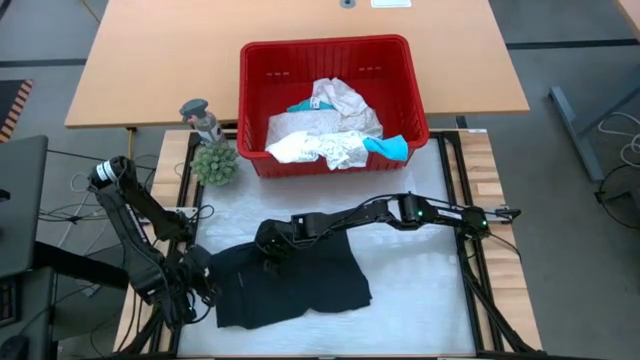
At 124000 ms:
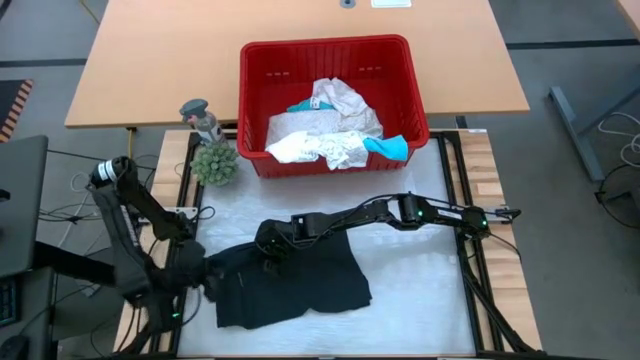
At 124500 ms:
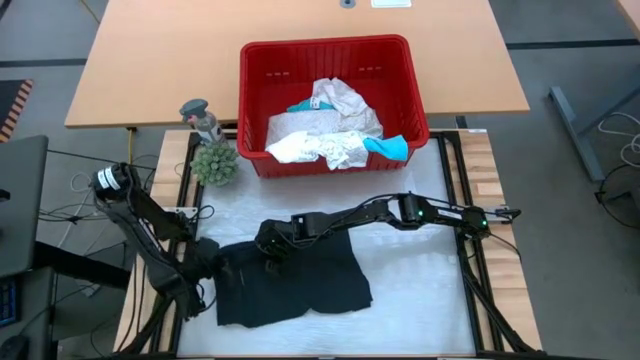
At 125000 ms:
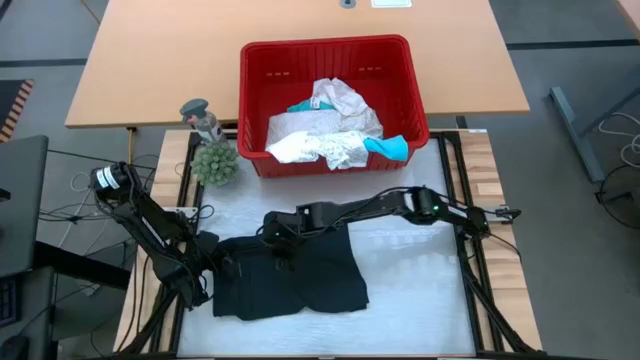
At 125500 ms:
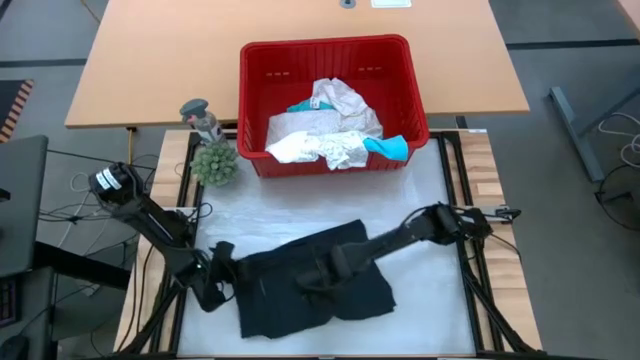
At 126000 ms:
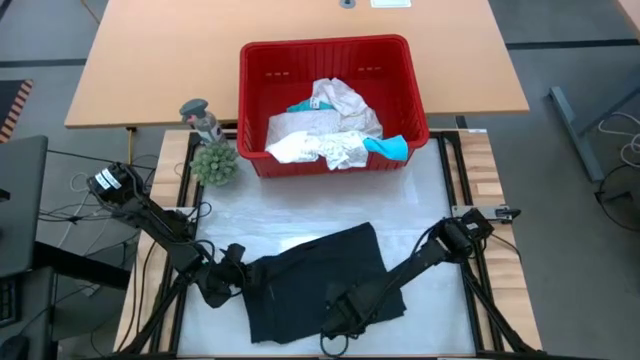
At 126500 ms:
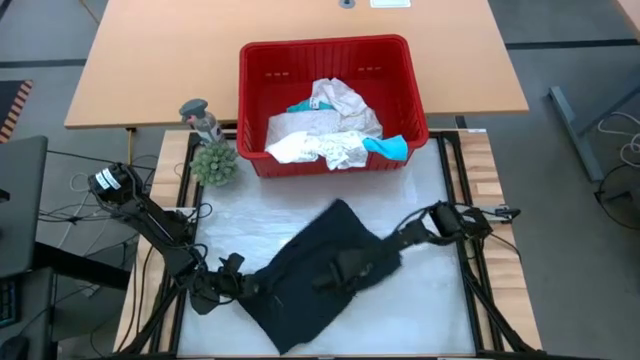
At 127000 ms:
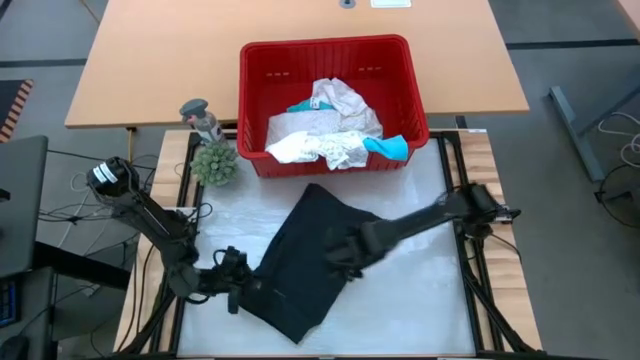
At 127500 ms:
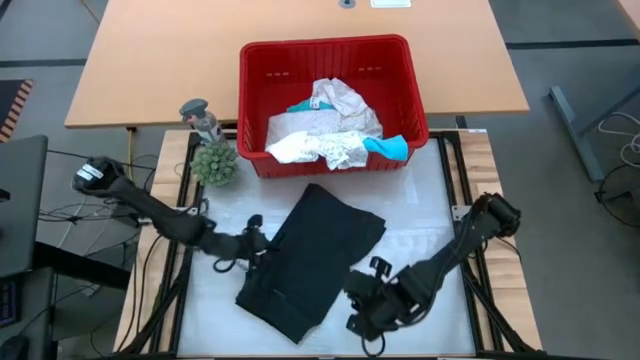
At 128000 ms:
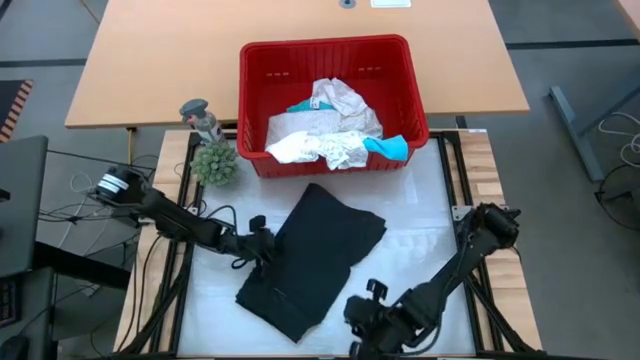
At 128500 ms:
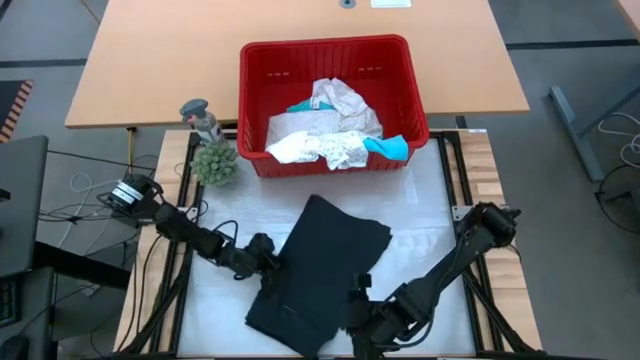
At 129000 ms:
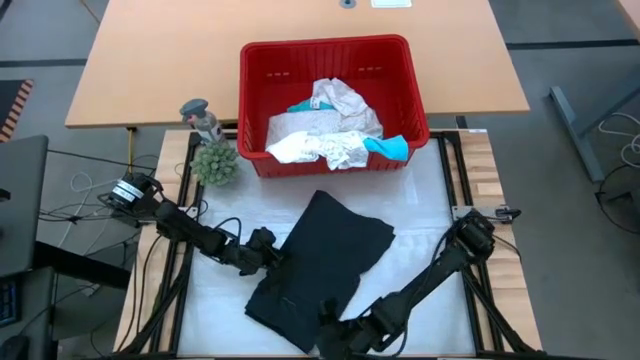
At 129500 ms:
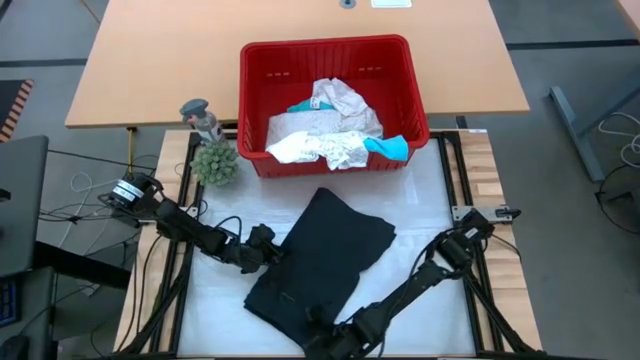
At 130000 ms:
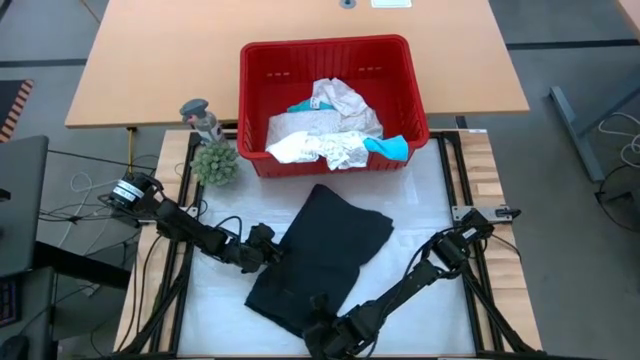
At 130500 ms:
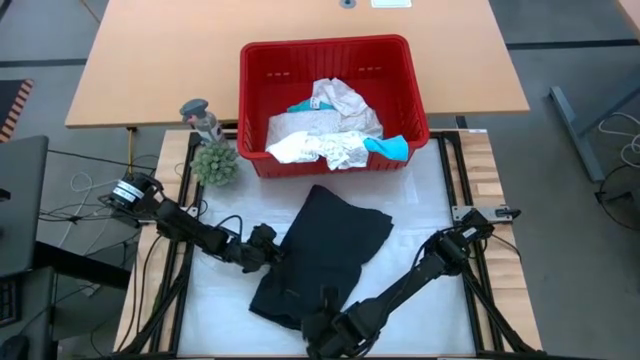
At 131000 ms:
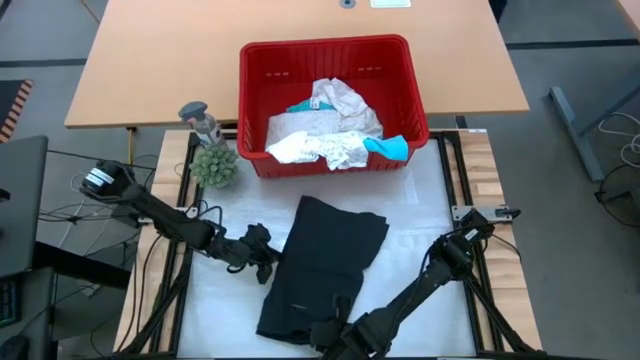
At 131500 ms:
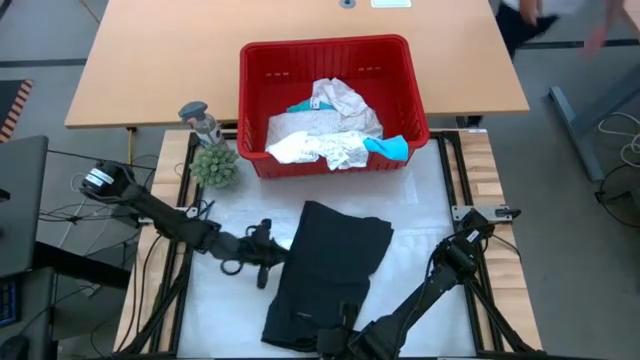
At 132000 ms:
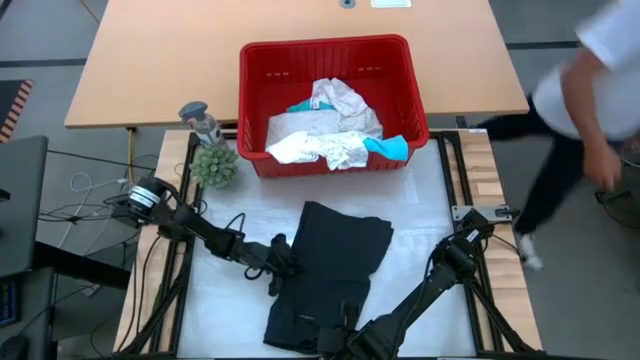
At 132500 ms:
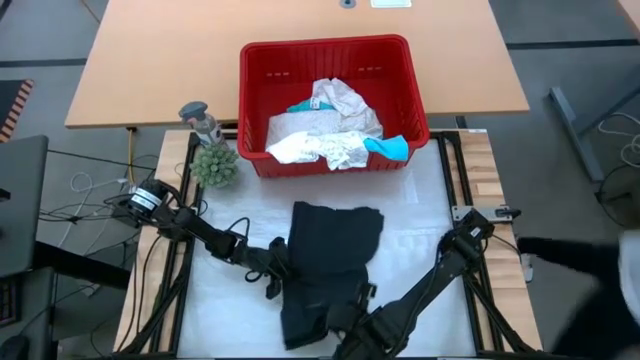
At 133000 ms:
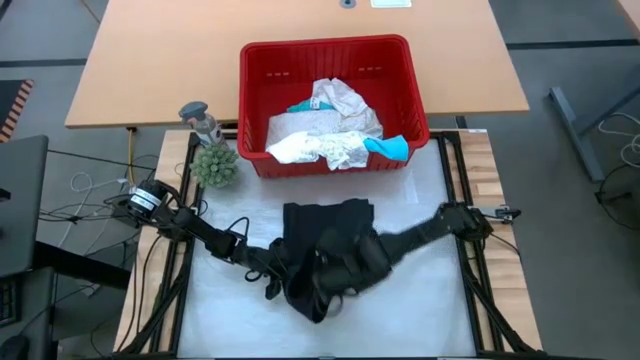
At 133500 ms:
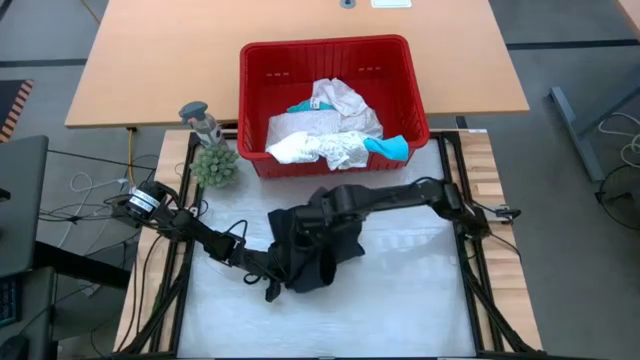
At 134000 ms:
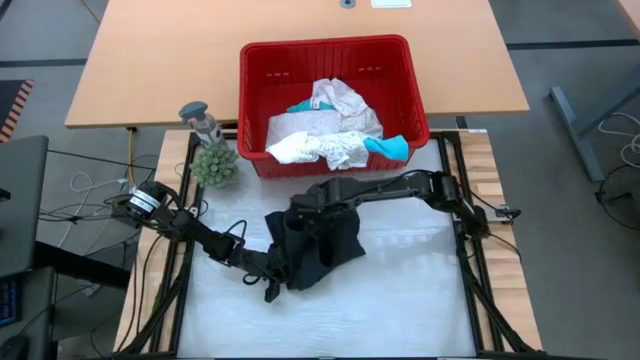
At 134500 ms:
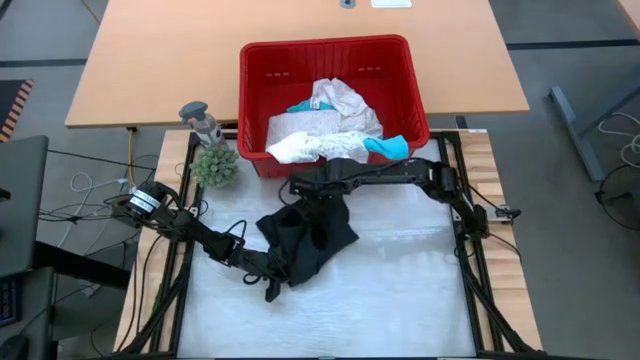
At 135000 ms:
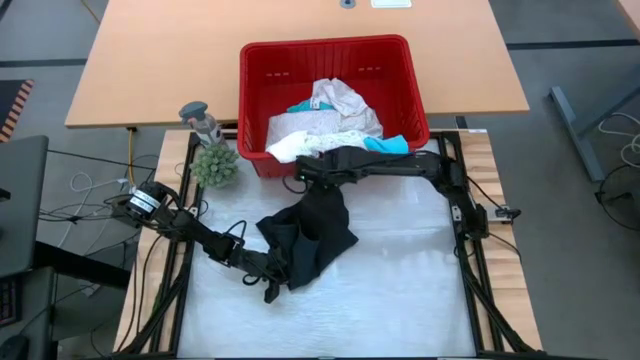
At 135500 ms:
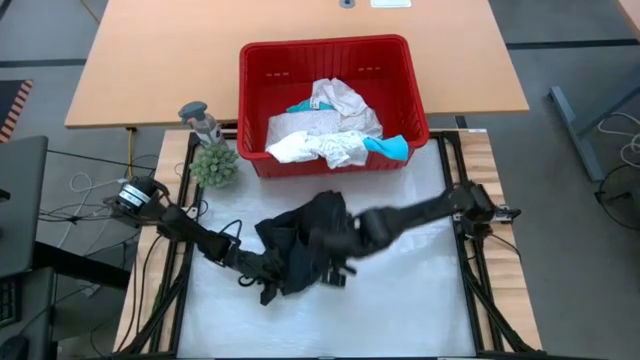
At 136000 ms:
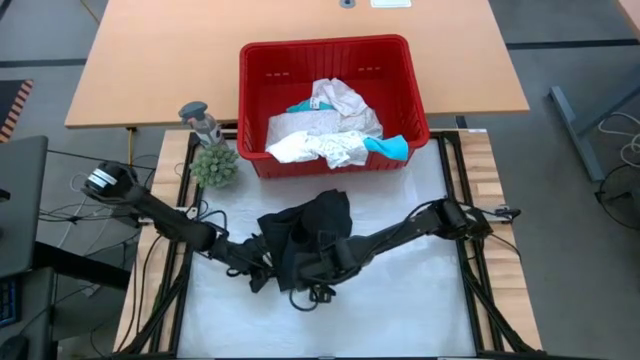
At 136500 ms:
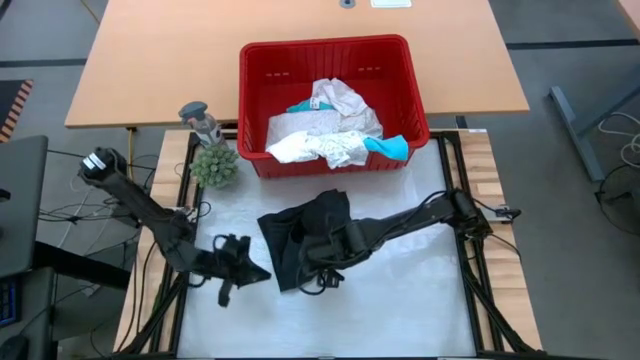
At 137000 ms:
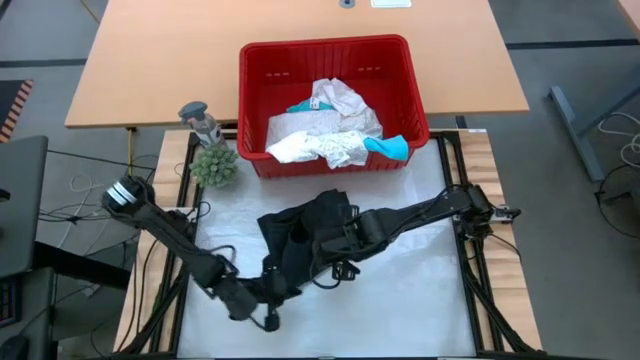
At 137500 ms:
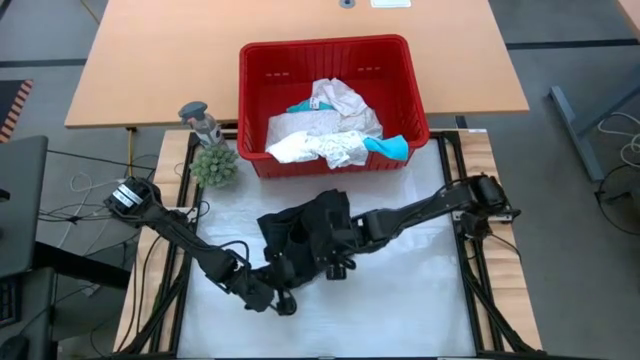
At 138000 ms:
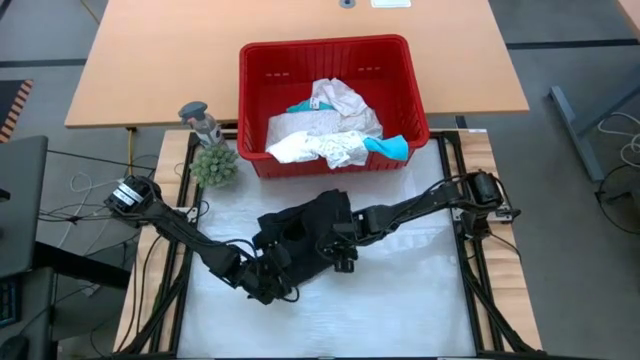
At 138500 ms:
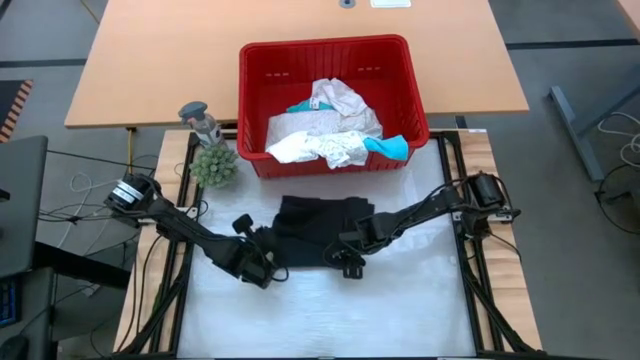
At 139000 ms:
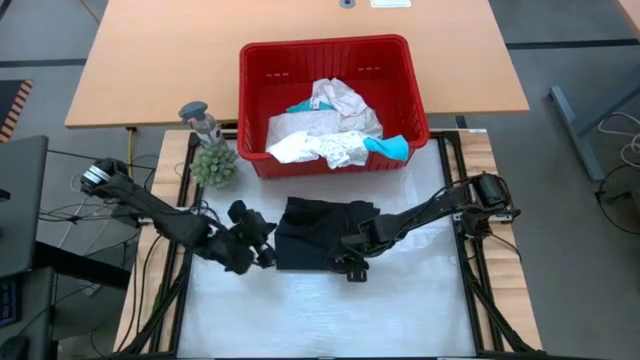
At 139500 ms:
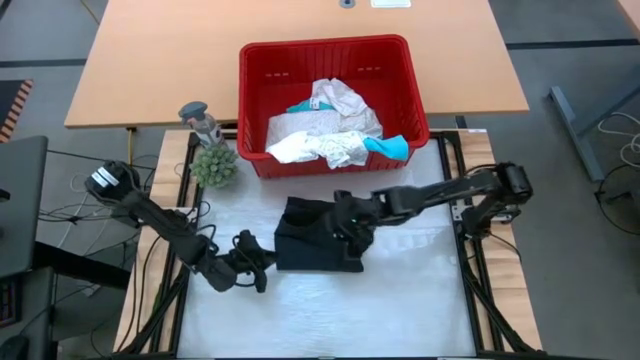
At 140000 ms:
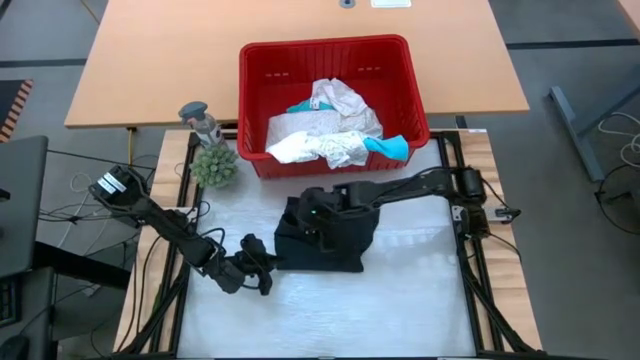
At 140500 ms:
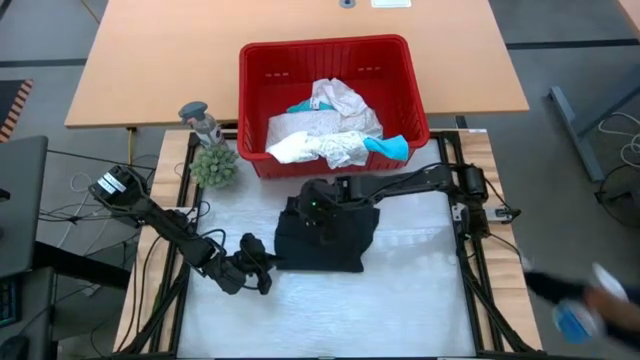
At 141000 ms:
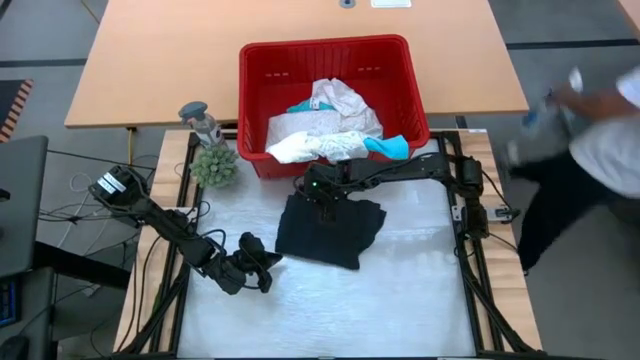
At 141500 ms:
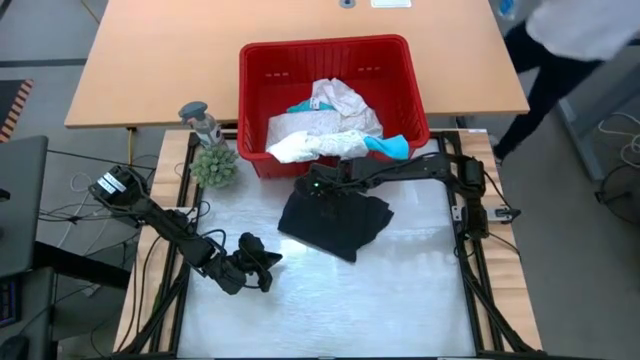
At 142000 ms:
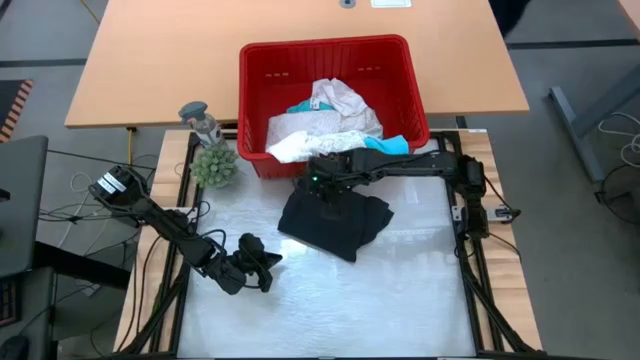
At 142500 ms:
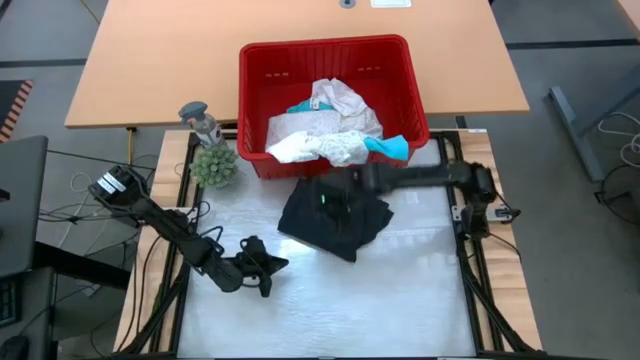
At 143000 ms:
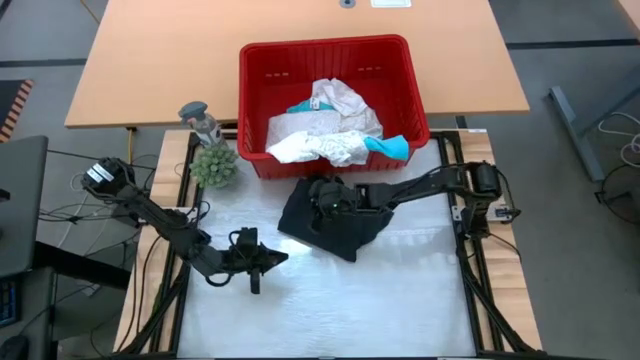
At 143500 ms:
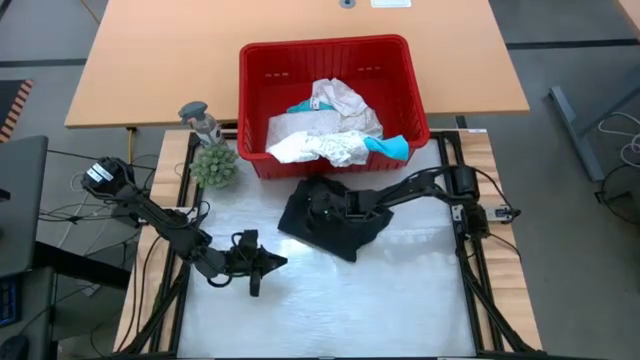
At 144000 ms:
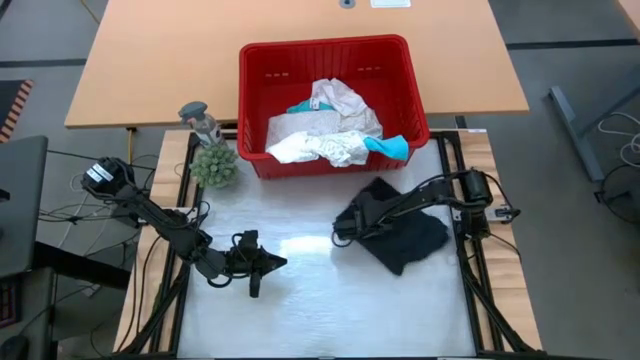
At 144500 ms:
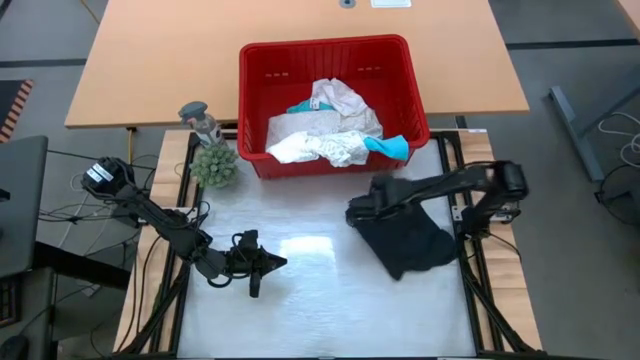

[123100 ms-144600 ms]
Task: Fold Laundry from Bin
Fold the black shorts
